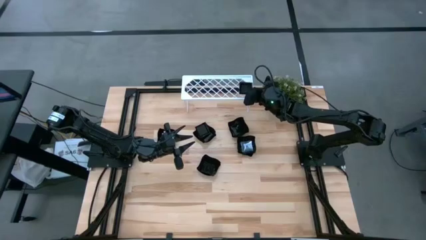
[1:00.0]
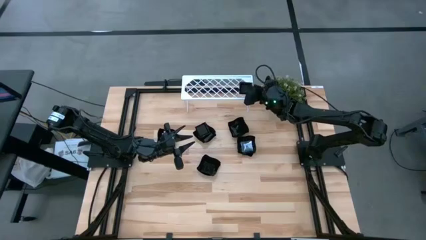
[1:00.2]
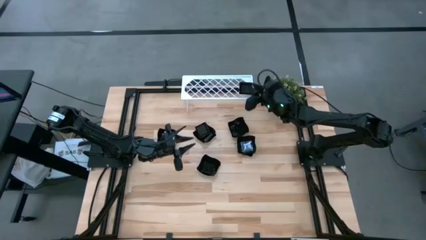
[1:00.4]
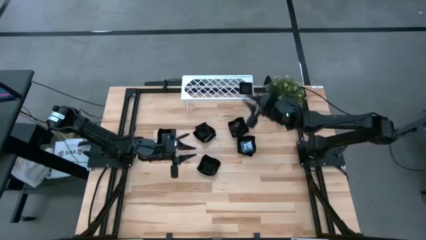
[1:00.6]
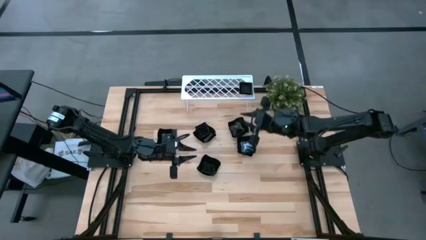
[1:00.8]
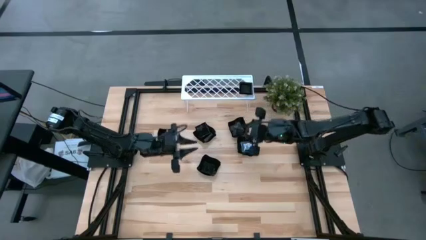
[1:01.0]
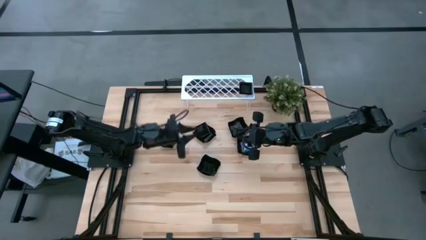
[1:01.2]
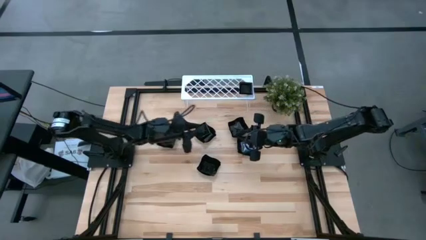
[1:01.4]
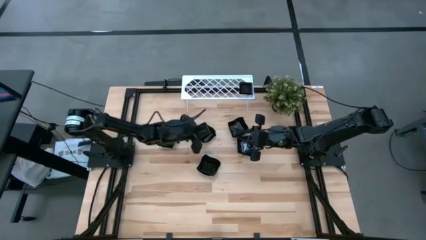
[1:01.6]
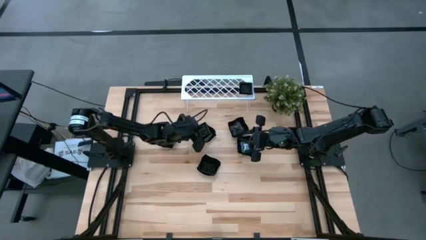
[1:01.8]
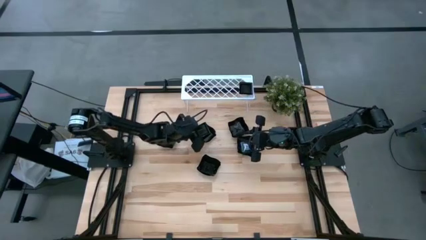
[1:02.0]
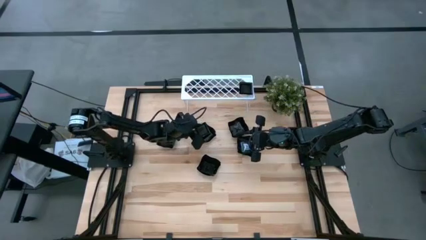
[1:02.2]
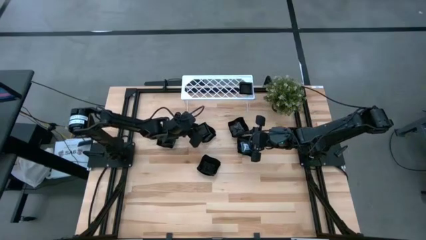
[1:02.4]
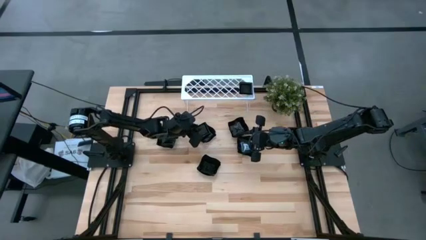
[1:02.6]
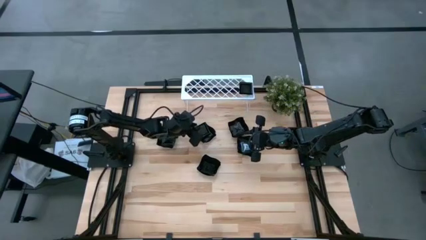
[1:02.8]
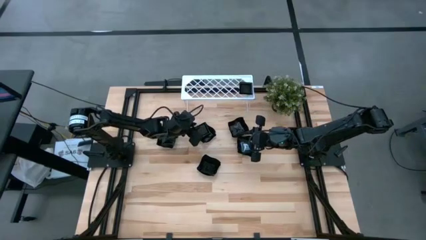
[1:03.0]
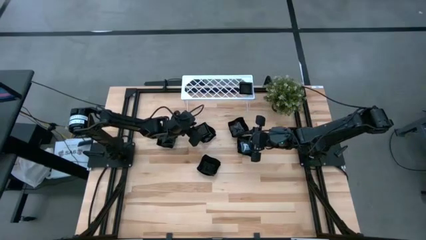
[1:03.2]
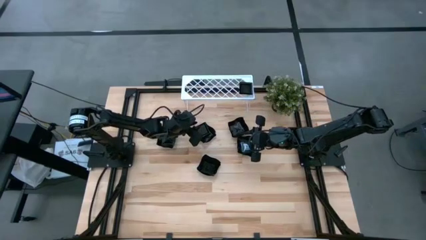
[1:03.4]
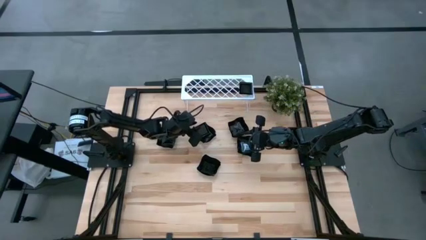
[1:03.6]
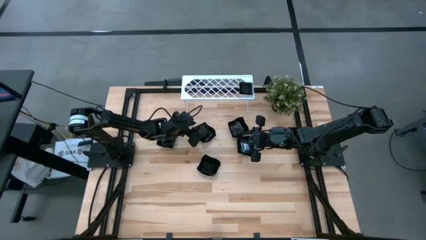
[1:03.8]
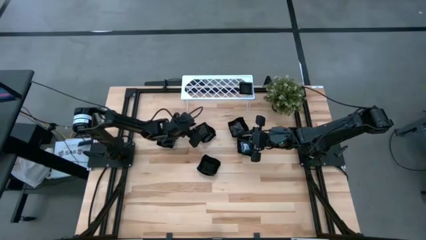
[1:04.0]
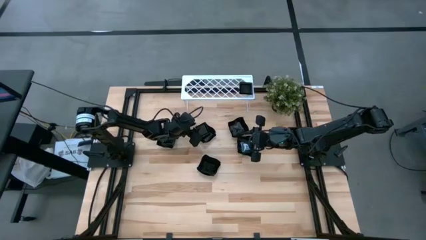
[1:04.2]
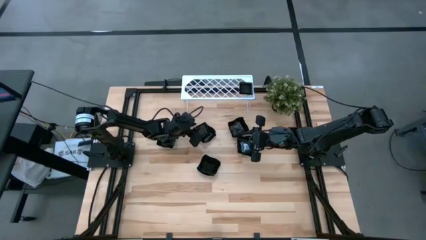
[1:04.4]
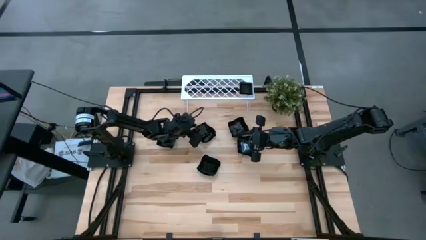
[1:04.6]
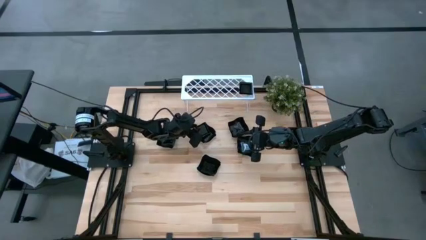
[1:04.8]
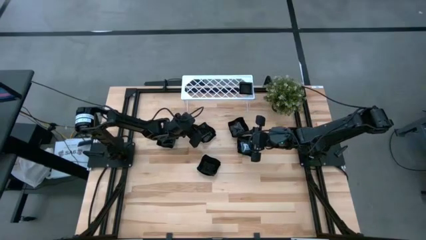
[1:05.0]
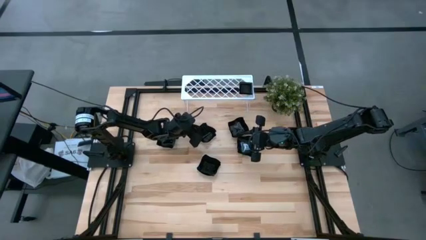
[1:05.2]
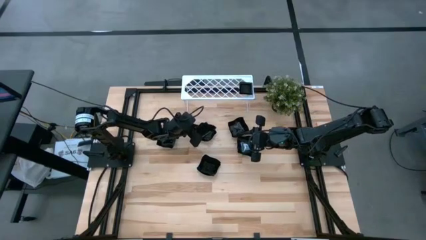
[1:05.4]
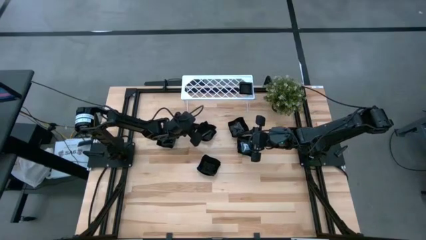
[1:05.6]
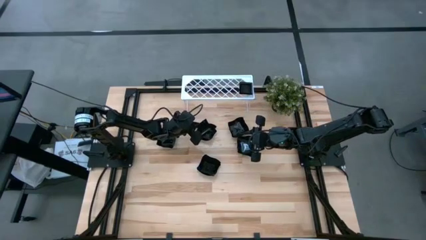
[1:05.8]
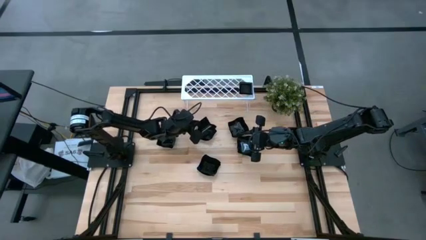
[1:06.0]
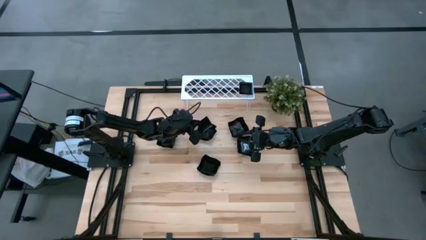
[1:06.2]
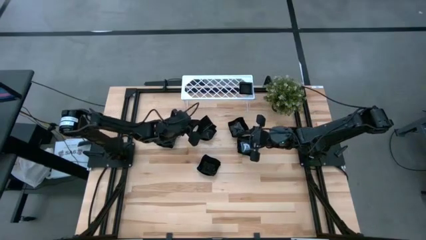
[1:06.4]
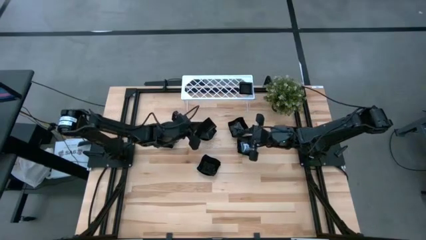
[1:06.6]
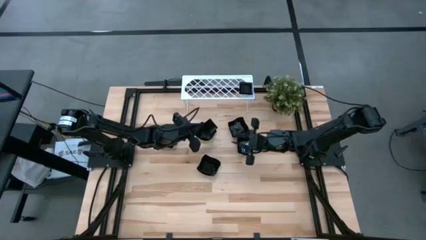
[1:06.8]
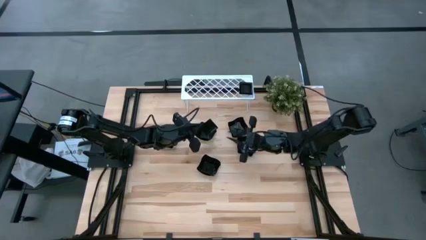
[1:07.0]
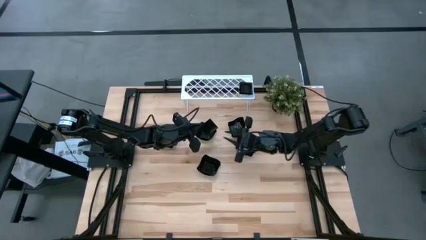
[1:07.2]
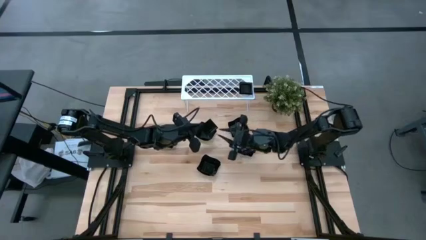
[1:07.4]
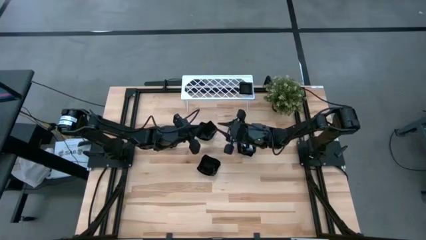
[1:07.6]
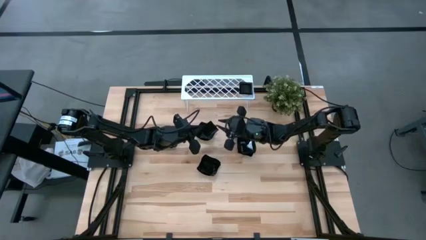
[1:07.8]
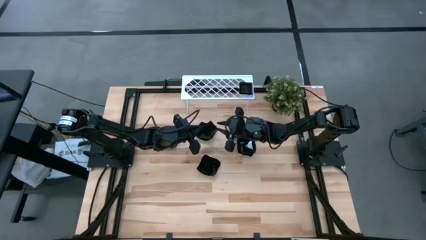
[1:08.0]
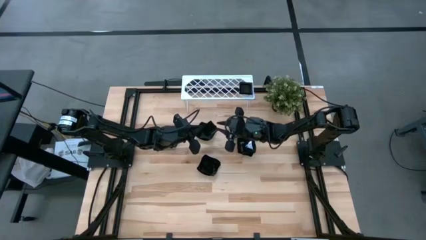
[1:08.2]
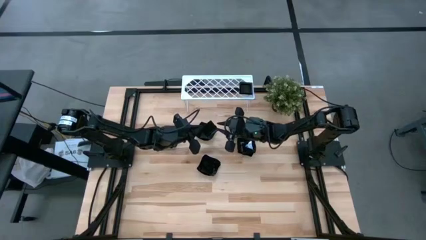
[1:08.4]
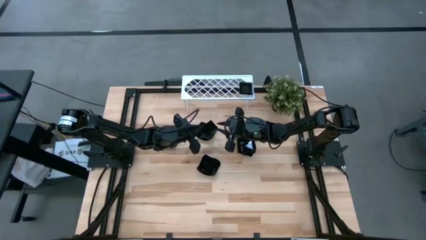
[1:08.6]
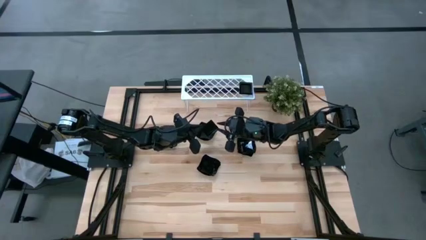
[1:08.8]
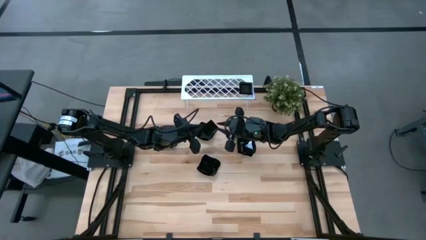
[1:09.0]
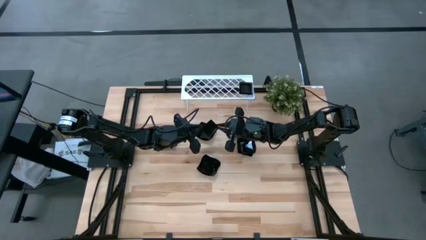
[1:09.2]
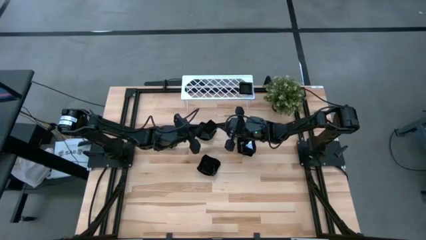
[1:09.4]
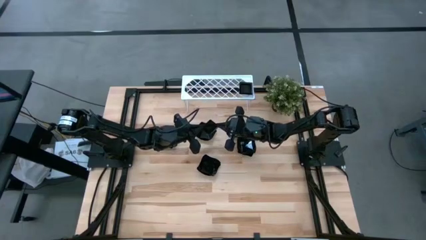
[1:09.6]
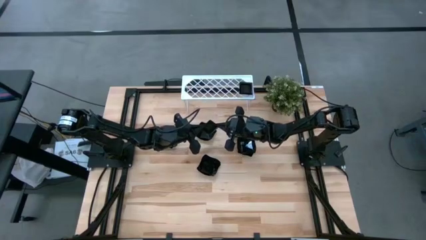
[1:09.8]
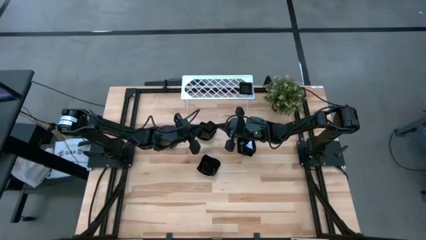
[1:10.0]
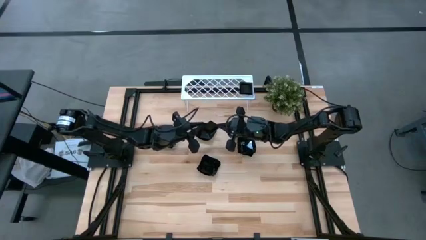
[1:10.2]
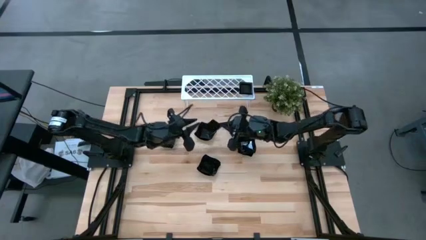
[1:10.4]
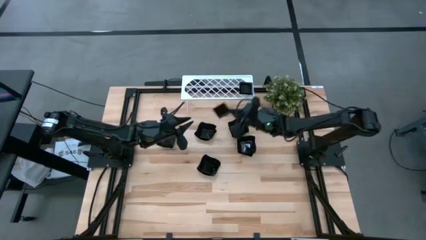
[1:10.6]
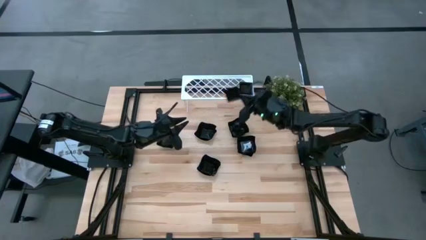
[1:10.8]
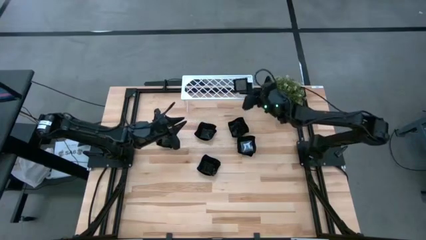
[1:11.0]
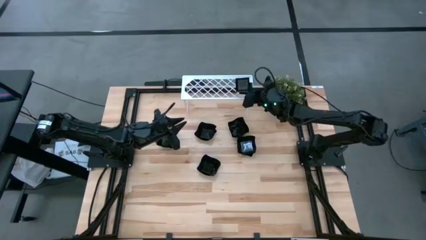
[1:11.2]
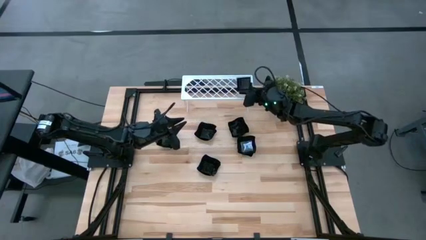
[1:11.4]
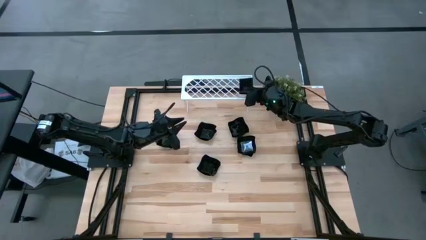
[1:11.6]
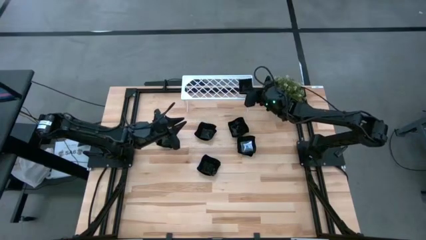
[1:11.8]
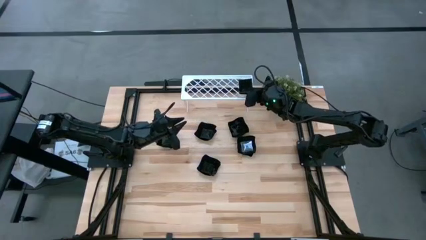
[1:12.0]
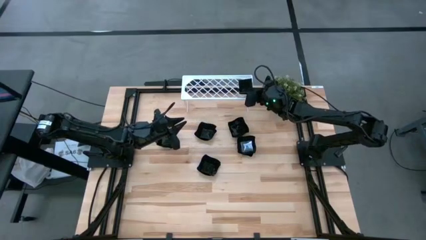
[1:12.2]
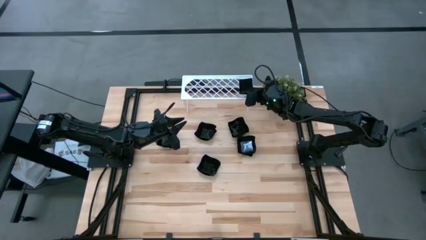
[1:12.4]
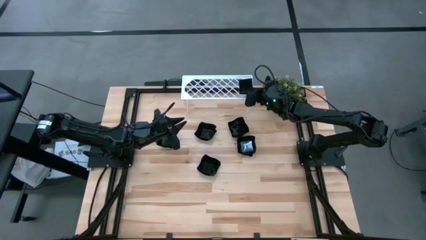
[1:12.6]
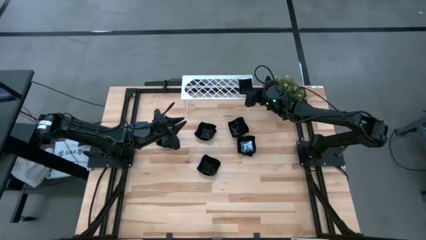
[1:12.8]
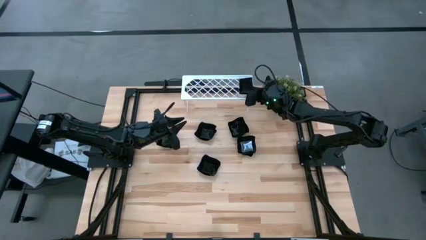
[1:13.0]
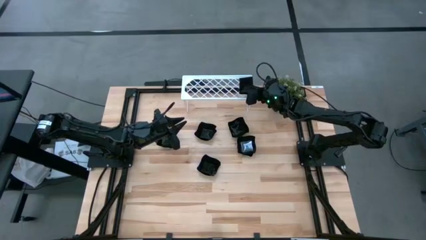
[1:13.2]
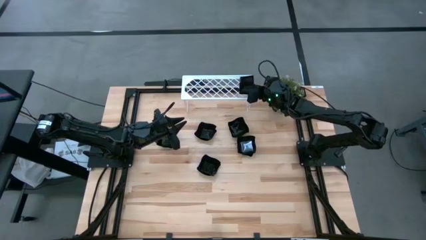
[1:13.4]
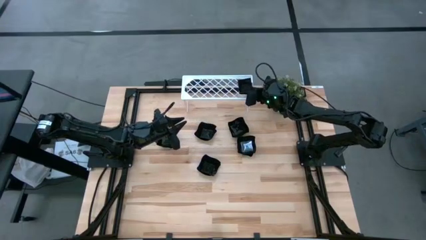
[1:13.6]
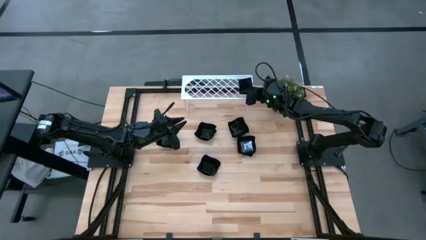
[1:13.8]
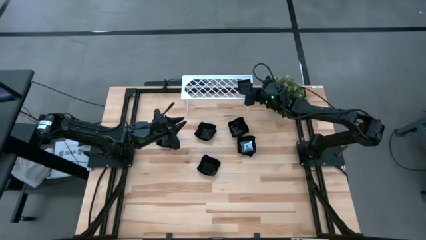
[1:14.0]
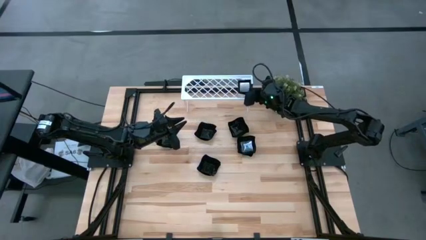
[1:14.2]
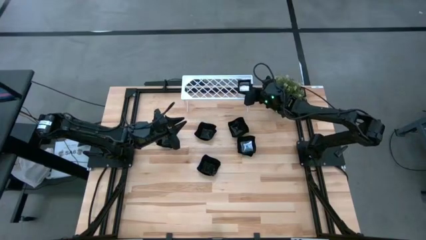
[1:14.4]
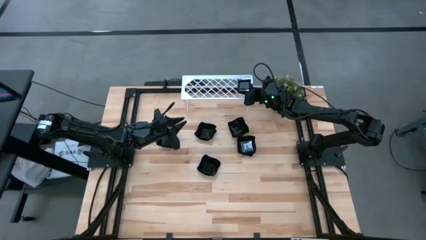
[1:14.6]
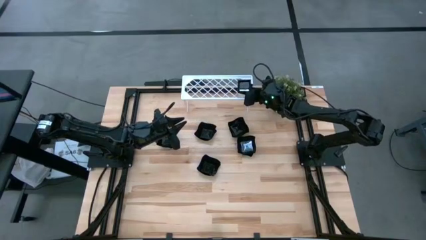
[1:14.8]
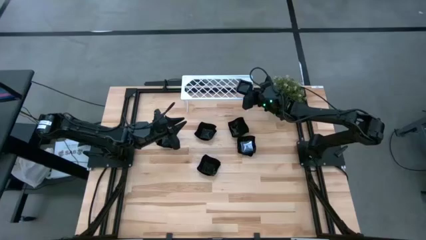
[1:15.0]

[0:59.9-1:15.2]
Task: Pick & Place Mini shaped plates
Stack the black square plate on top of the black square plate on the shelf

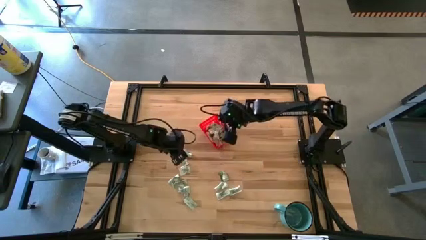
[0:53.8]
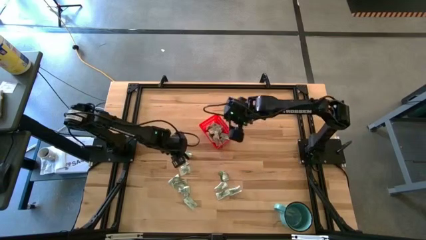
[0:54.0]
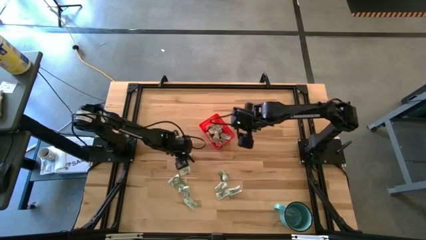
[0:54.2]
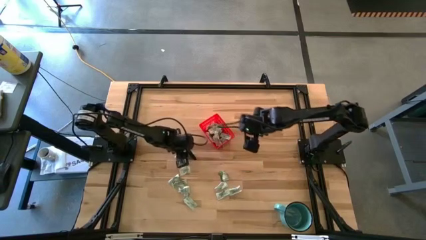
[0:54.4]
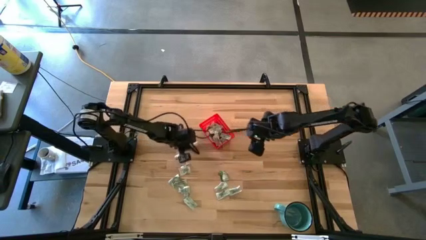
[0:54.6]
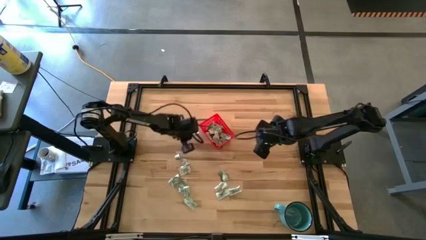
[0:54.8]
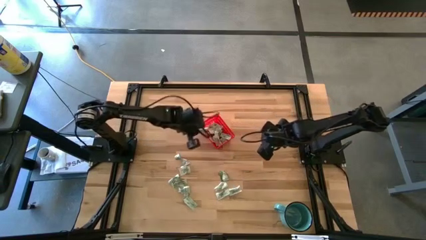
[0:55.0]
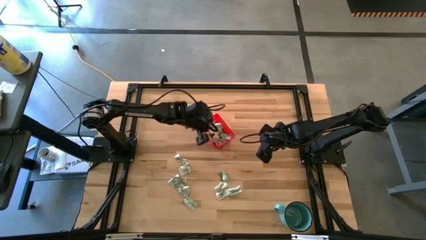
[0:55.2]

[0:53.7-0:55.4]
Task: Pick and place Stevia / Truvia into bins
Put the stevia packet into the red basket

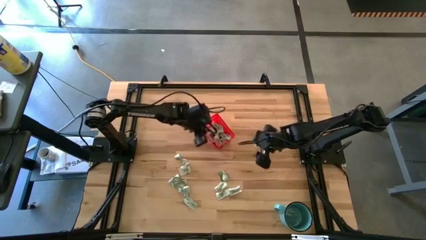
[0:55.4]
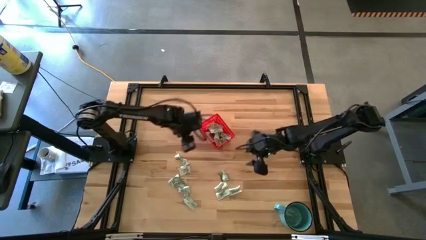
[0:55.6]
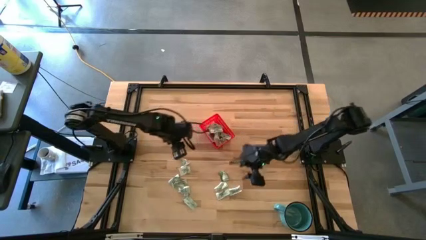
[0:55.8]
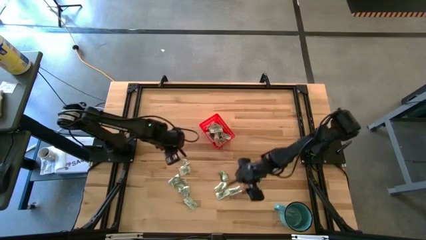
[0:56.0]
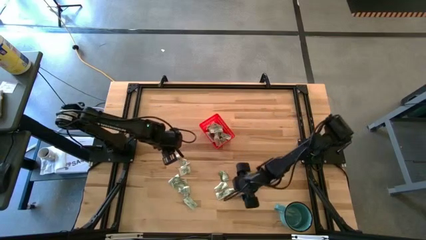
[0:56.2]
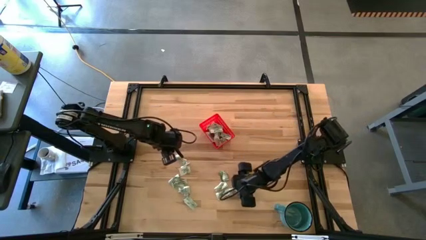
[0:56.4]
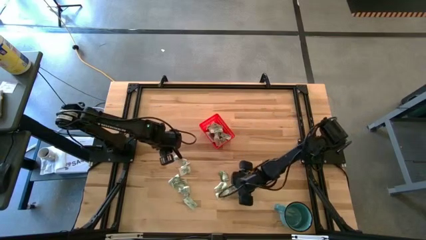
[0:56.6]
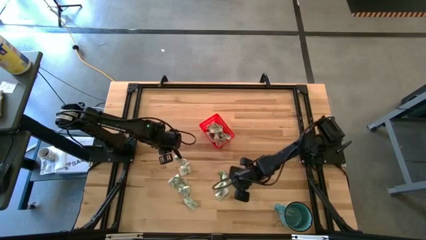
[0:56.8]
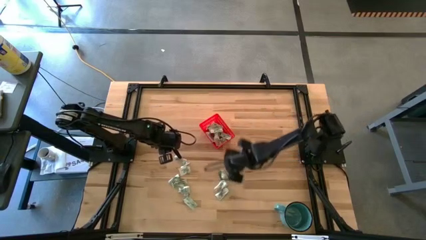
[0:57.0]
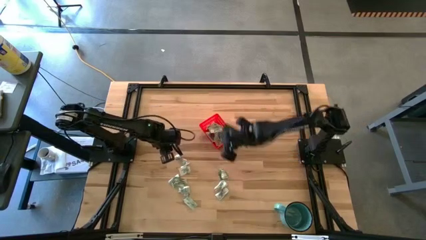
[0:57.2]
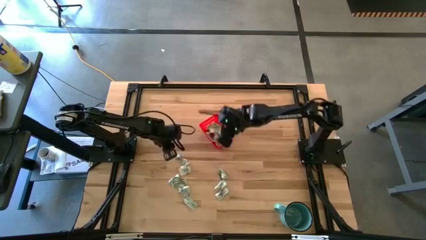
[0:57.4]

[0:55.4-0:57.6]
Put the stevia packet into the red basket
